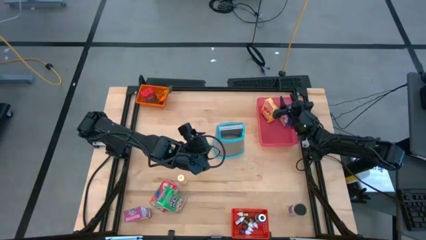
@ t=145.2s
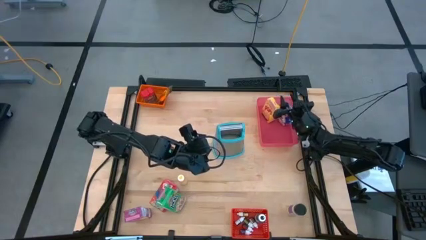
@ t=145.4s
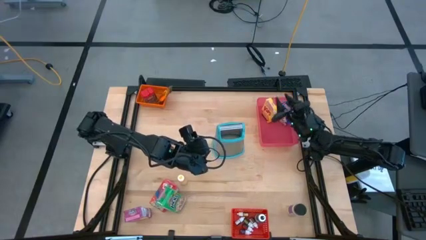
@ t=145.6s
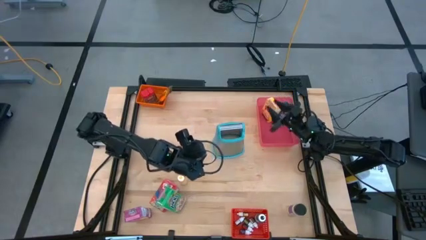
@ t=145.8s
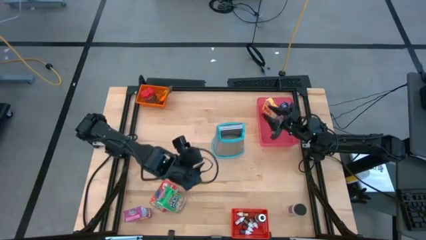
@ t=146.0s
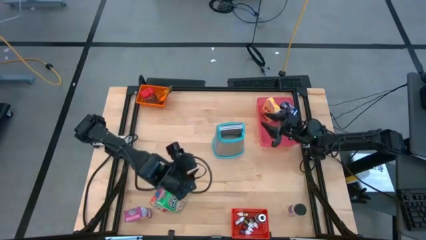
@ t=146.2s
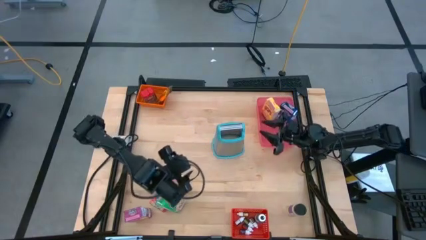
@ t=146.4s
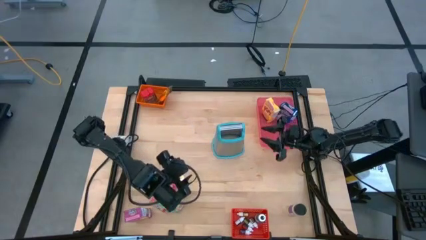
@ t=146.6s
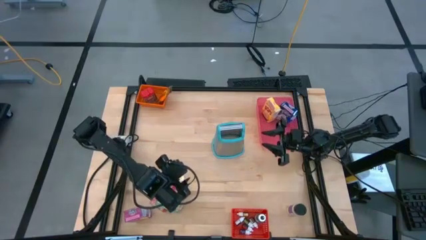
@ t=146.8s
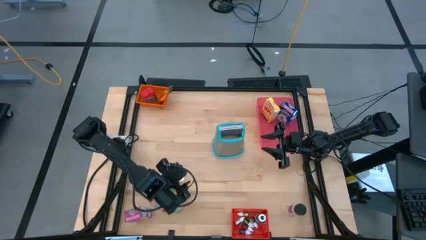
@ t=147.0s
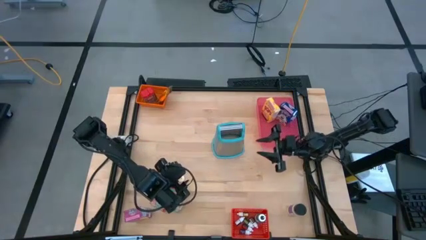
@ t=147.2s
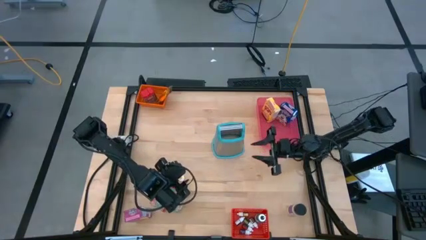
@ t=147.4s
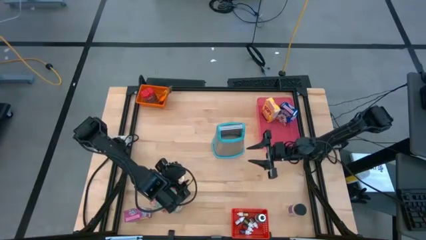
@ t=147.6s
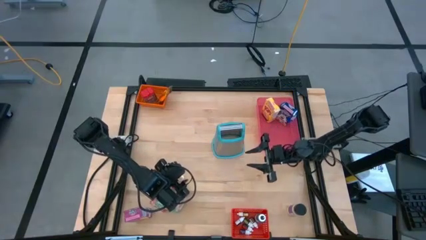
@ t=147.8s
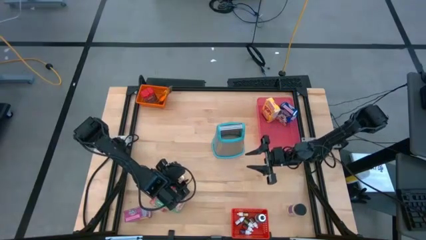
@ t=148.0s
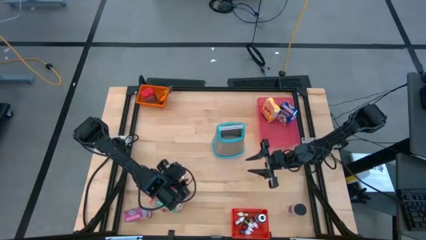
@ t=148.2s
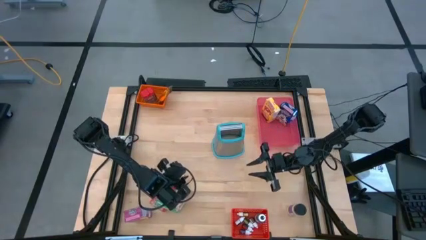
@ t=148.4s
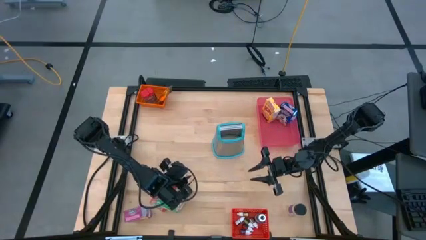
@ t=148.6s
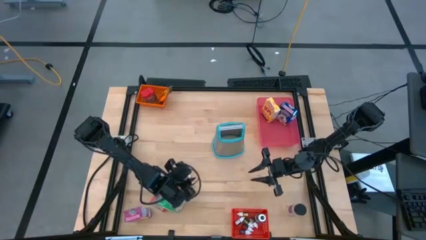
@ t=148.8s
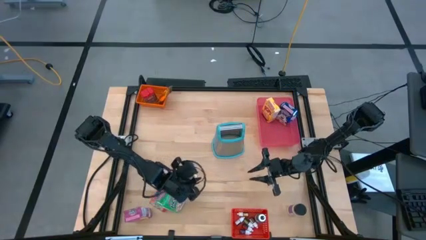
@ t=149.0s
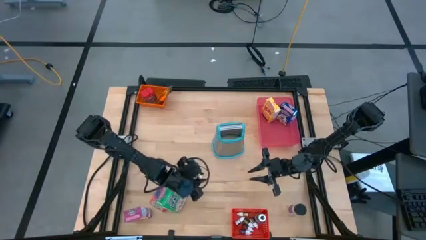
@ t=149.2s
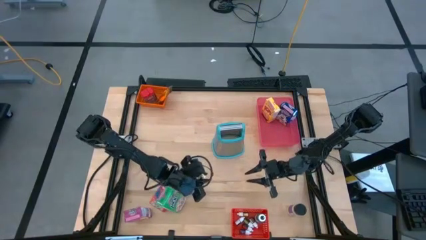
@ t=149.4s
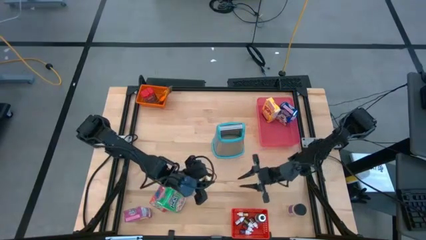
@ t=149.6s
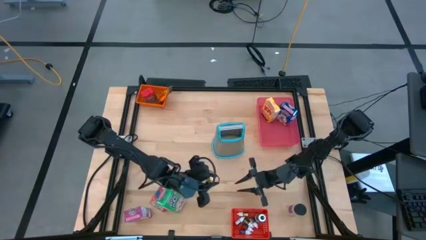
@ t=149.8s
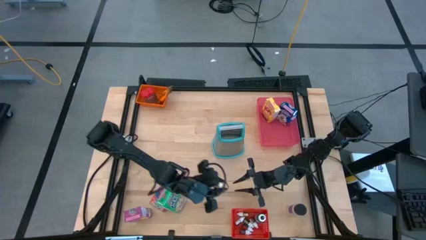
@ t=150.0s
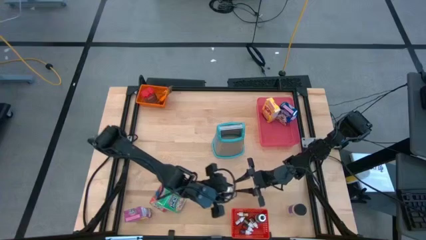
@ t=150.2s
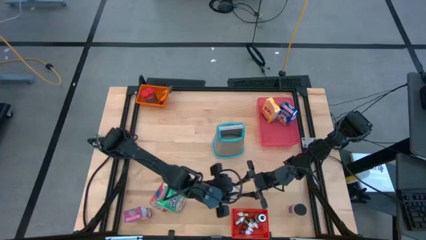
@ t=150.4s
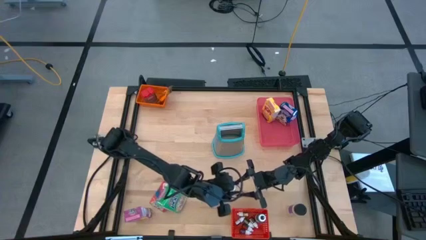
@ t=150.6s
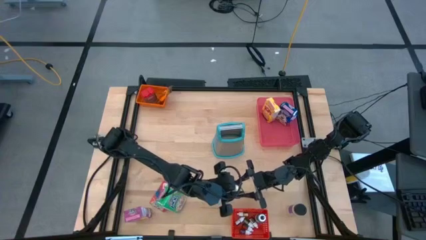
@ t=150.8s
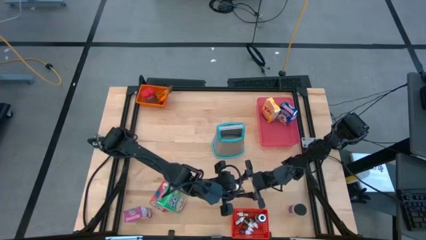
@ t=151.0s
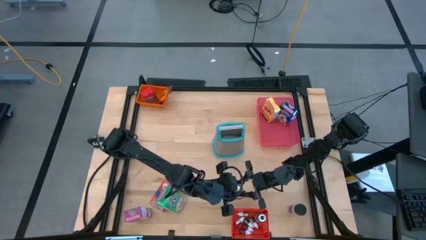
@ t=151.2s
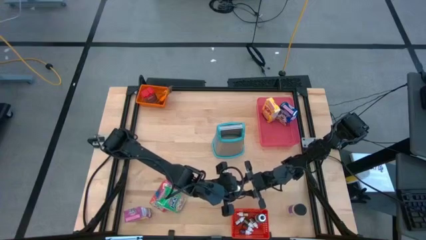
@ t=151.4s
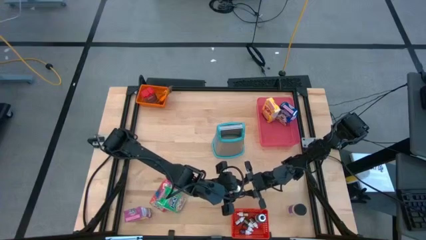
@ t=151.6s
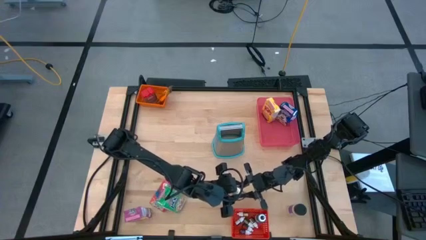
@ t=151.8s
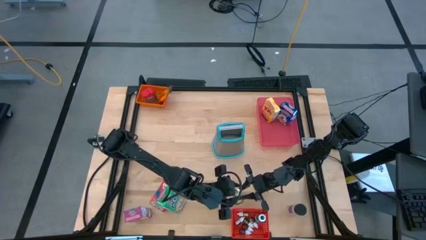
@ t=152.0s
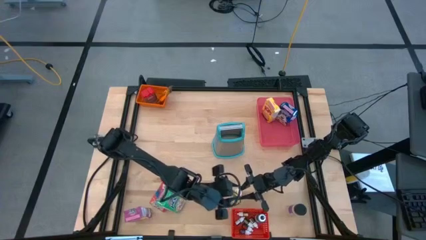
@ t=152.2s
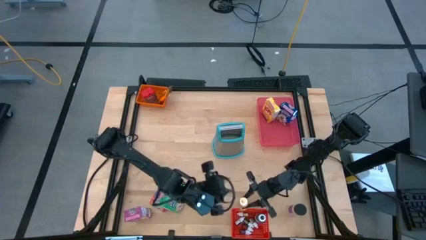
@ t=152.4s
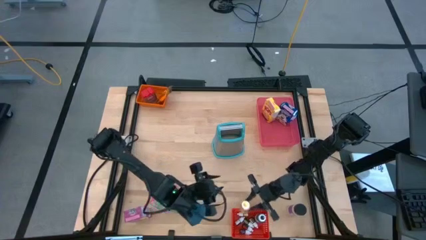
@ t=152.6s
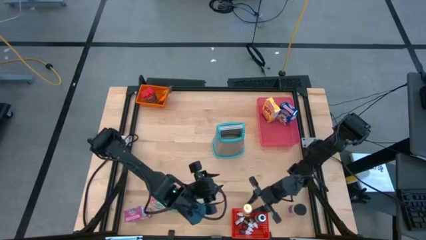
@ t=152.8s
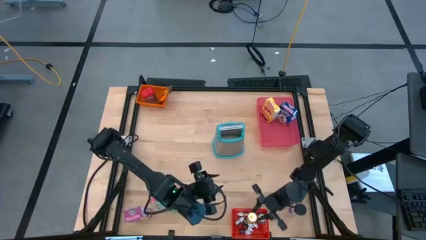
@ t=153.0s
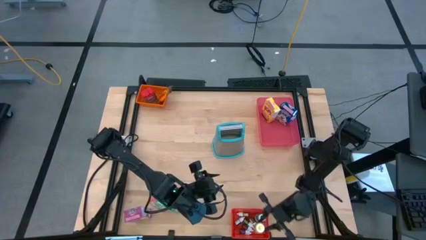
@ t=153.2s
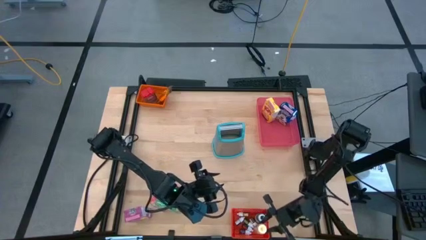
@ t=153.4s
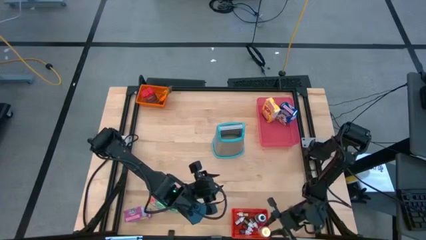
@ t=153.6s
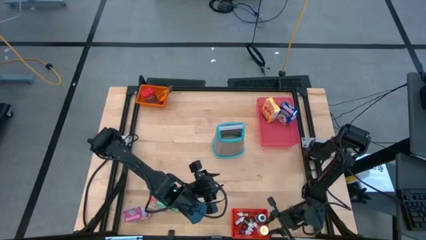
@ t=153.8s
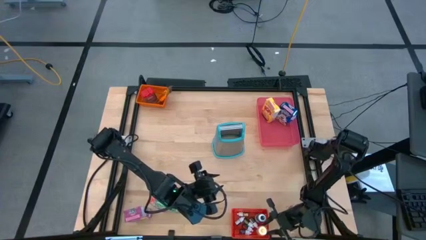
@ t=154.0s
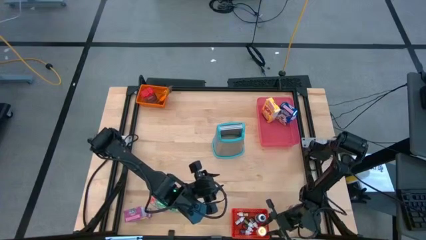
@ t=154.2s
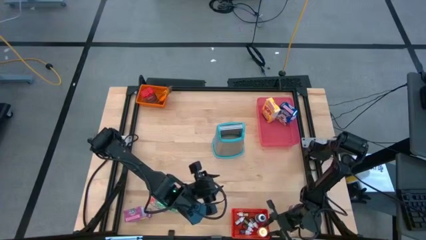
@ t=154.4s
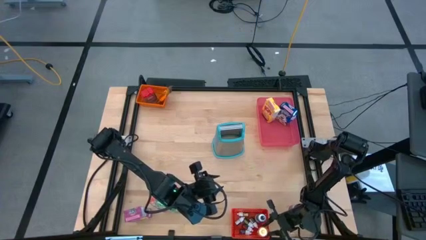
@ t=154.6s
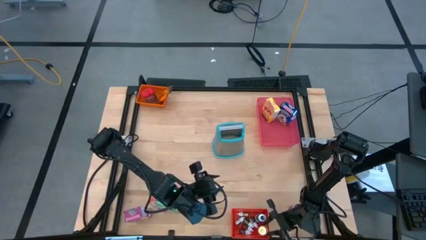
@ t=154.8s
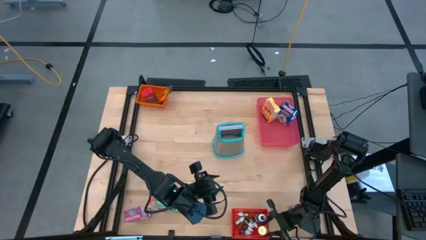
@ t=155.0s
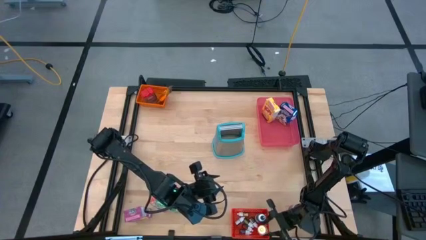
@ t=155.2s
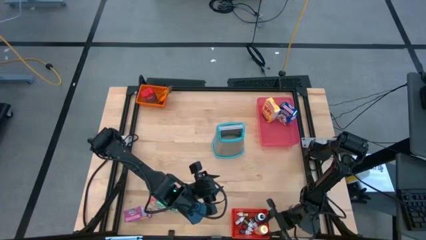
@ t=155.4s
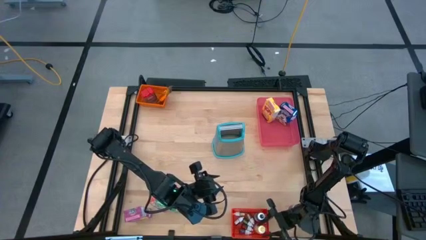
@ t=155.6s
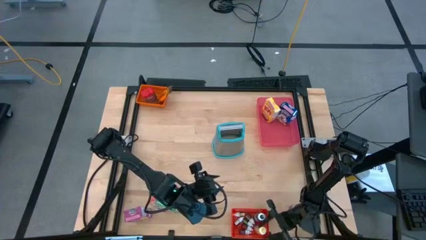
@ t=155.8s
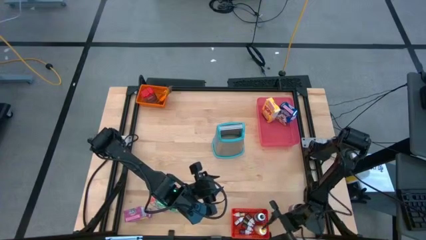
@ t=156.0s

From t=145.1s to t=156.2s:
Task: Pick & Place Kitchen Items
Put the big yellow food coloring bottle into the red bin

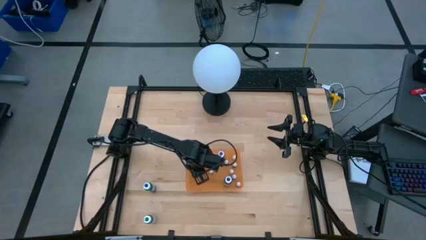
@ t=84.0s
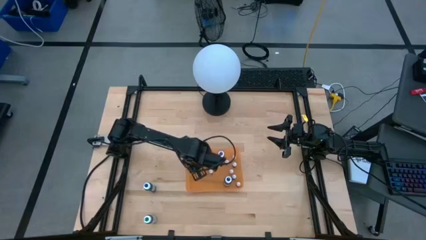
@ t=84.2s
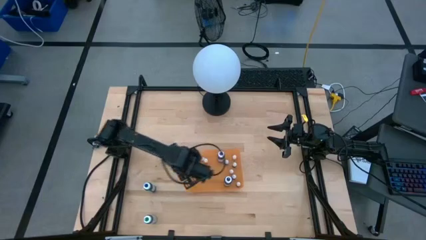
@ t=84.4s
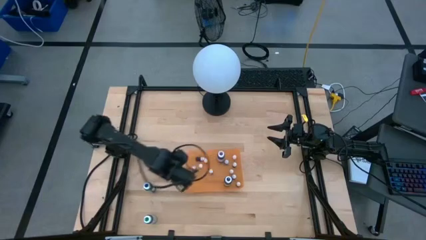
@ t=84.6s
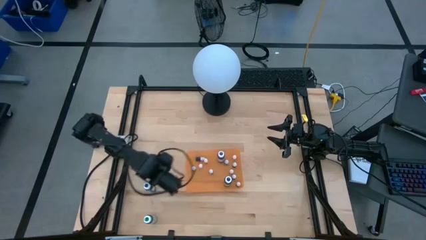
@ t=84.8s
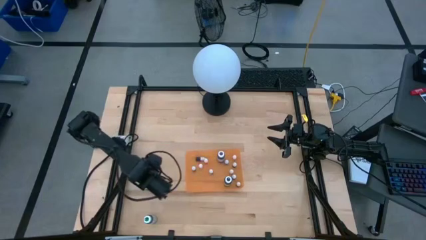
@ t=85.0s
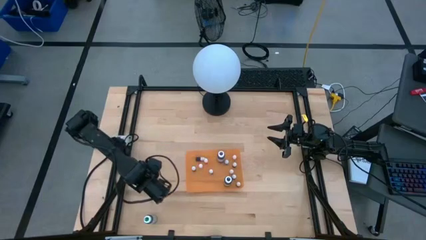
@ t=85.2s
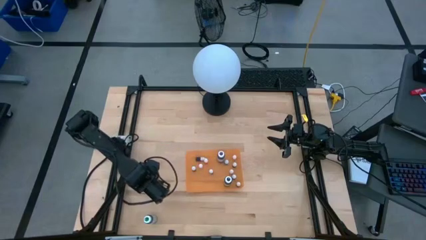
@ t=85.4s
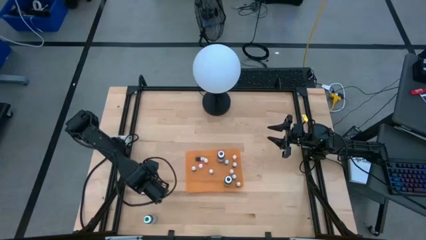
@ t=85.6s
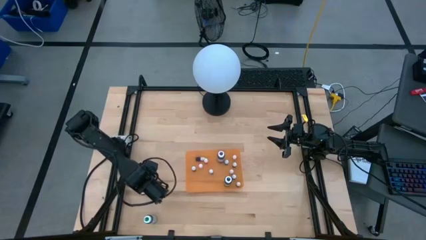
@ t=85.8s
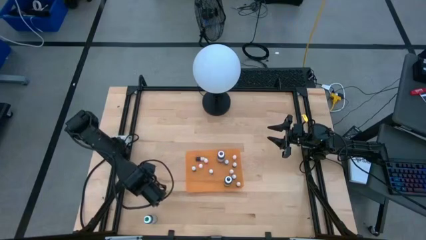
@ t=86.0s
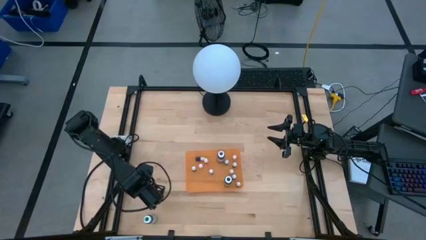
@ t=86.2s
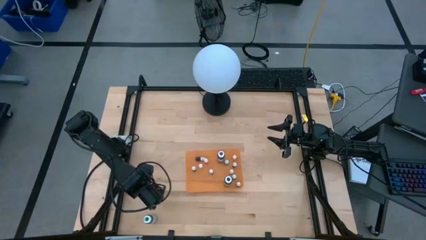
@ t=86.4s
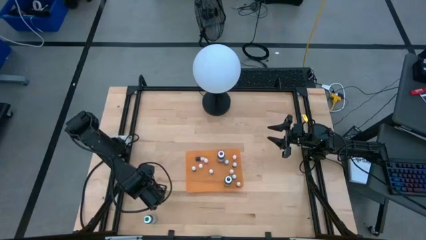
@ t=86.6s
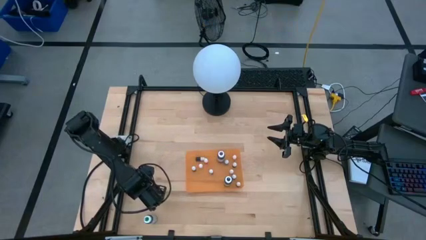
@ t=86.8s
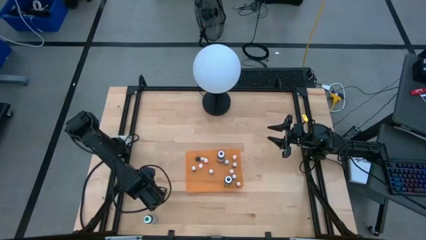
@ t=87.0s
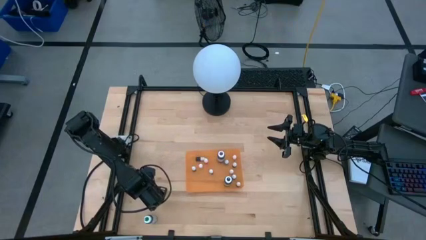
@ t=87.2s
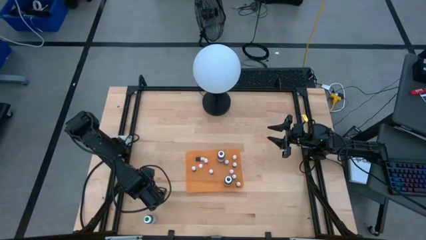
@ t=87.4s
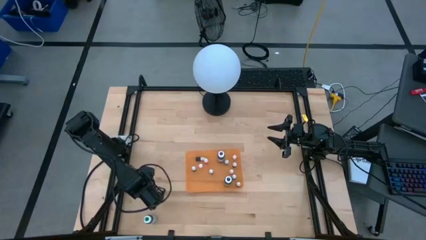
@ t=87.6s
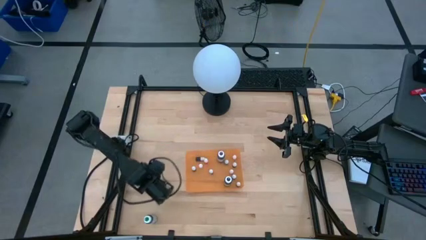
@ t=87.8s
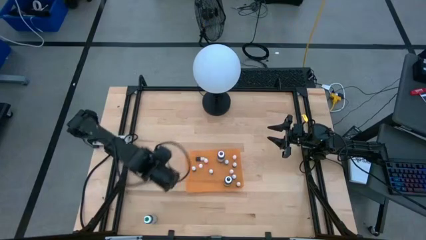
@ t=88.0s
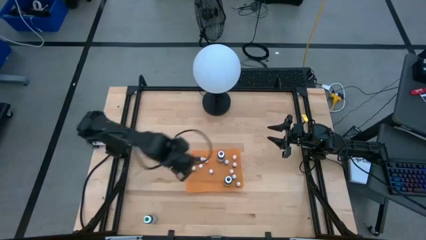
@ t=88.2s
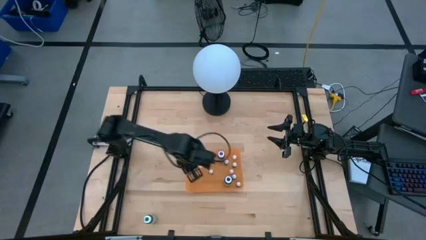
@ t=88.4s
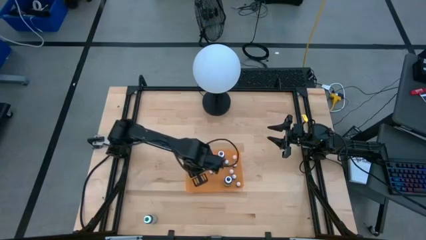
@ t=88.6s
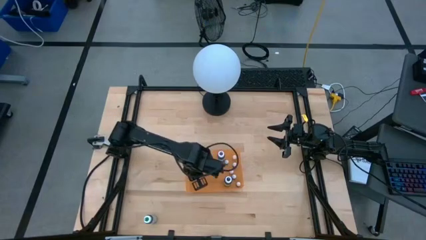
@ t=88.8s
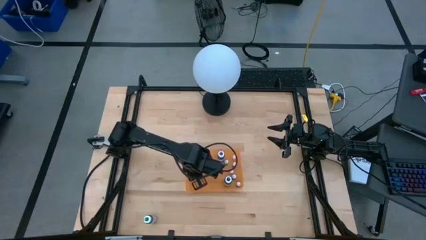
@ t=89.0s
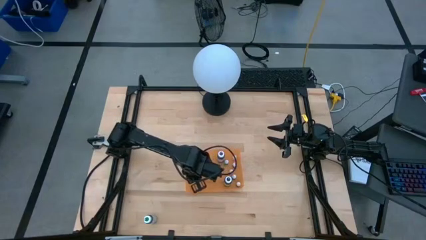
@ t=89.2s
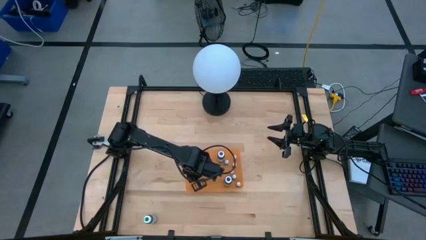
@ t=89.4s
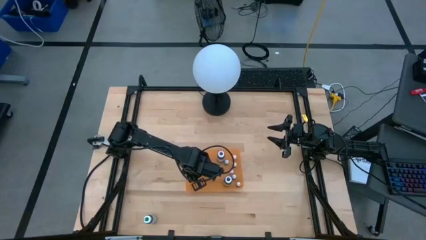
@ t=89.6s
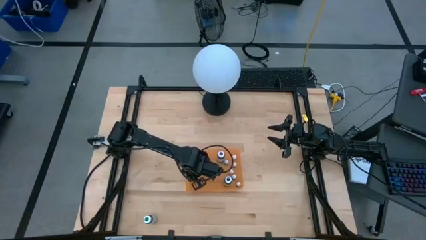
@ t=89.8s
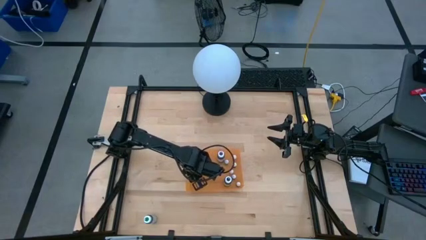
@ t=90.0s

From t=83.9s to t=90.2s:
Task: Pick & Place food coloring
Put the large blue food coloring bottle into the orange container
